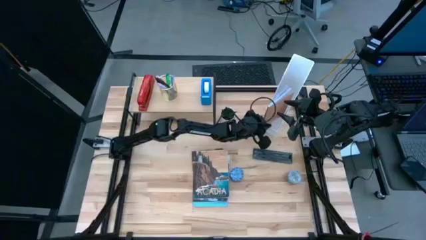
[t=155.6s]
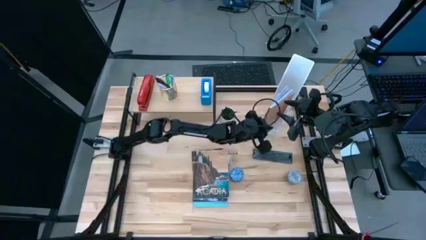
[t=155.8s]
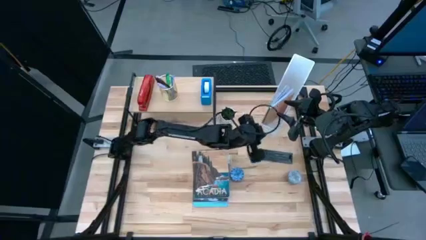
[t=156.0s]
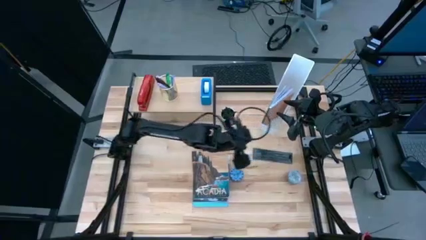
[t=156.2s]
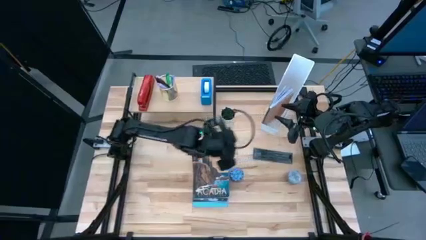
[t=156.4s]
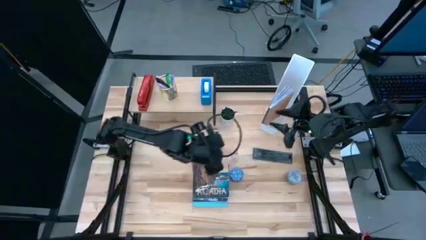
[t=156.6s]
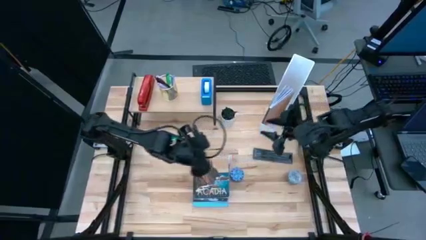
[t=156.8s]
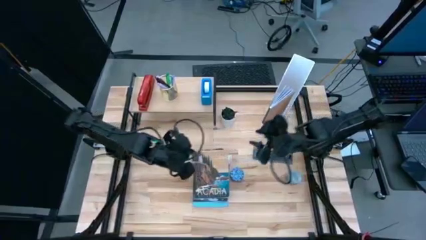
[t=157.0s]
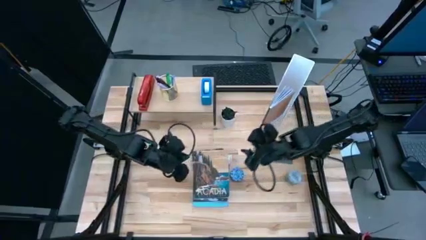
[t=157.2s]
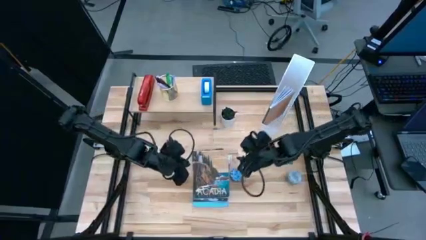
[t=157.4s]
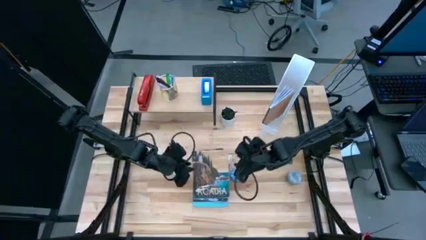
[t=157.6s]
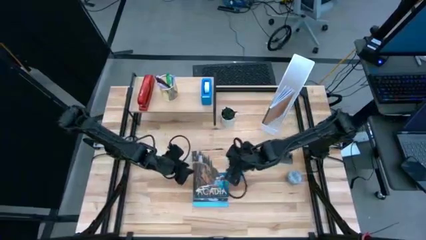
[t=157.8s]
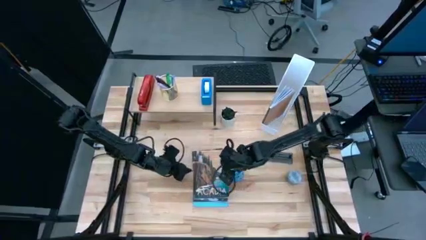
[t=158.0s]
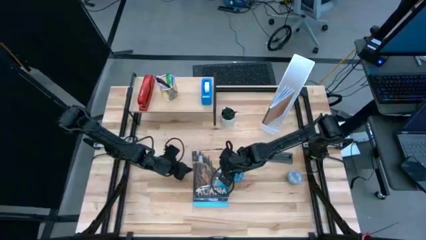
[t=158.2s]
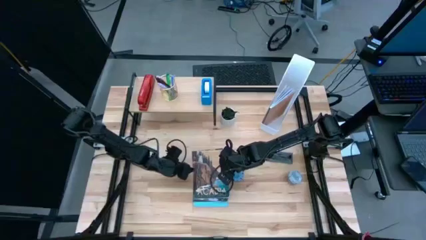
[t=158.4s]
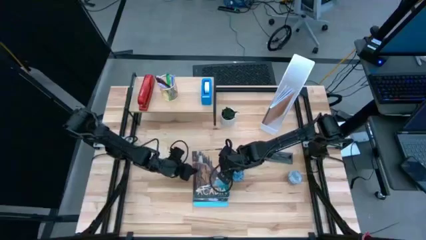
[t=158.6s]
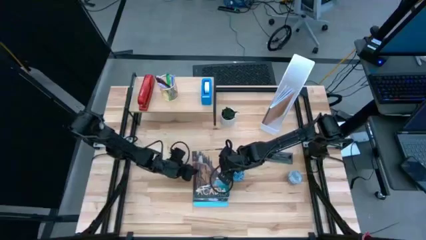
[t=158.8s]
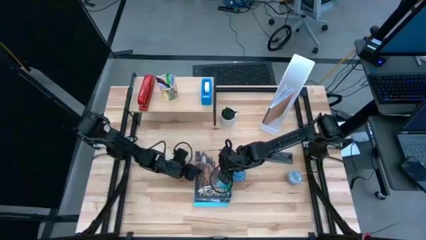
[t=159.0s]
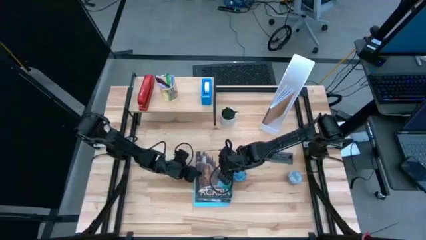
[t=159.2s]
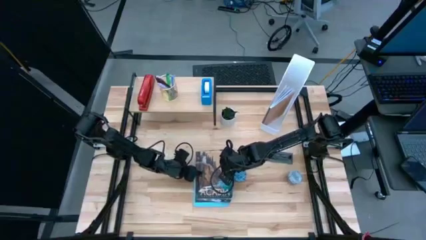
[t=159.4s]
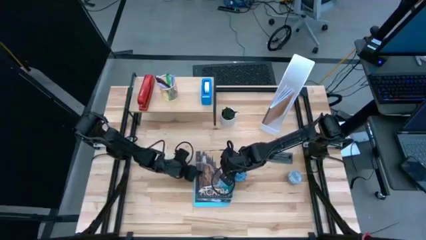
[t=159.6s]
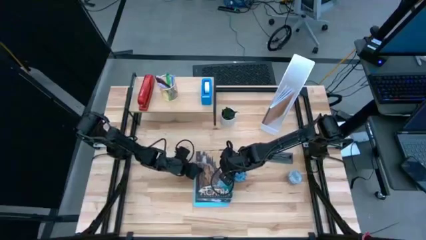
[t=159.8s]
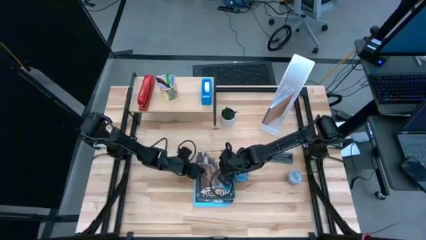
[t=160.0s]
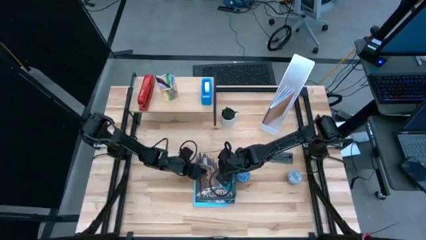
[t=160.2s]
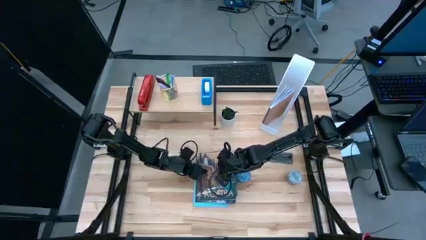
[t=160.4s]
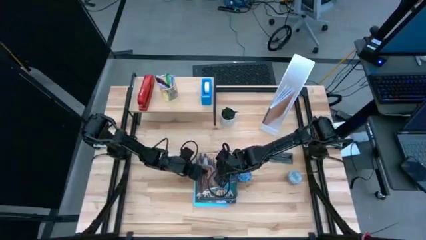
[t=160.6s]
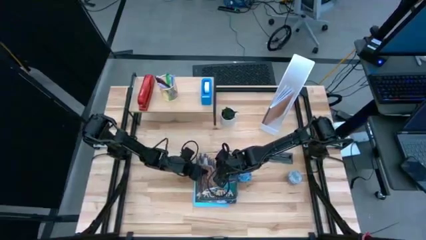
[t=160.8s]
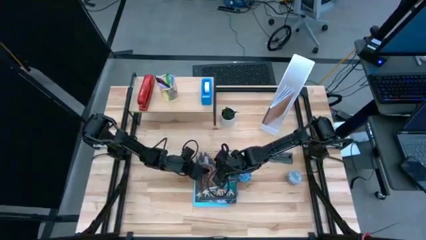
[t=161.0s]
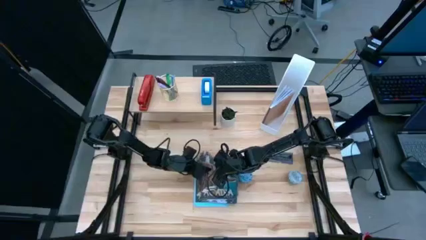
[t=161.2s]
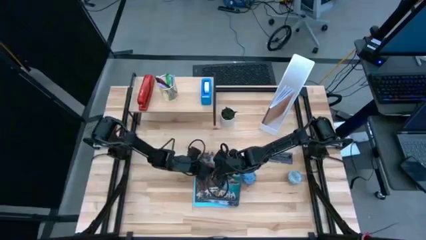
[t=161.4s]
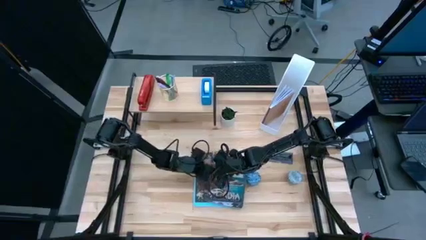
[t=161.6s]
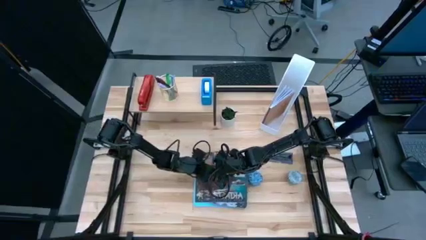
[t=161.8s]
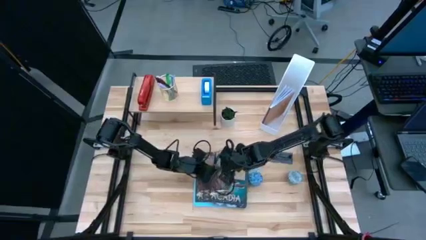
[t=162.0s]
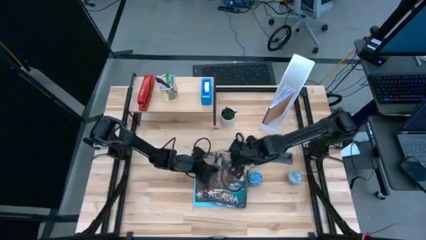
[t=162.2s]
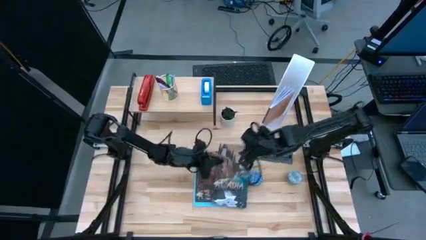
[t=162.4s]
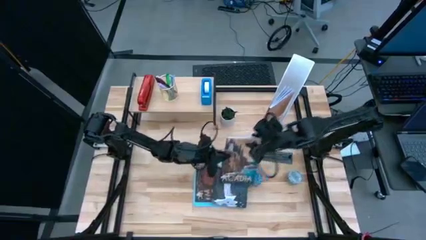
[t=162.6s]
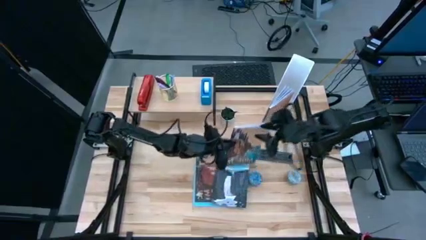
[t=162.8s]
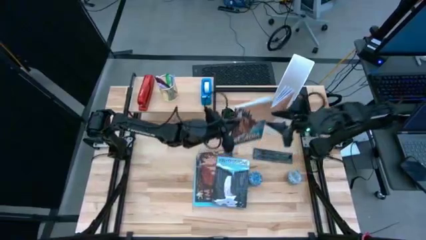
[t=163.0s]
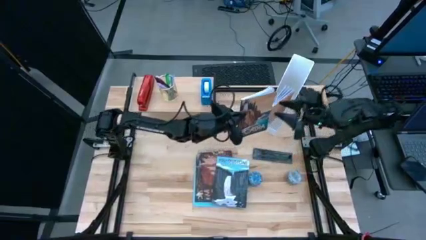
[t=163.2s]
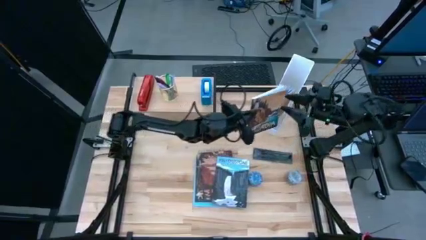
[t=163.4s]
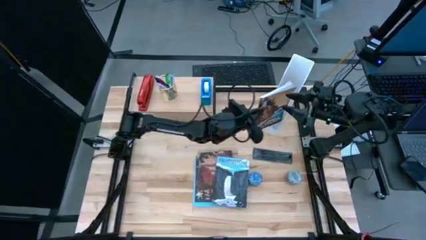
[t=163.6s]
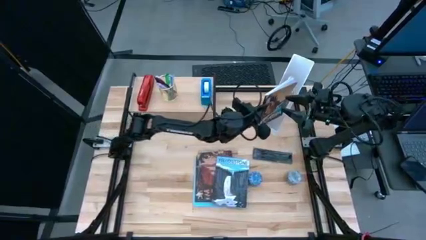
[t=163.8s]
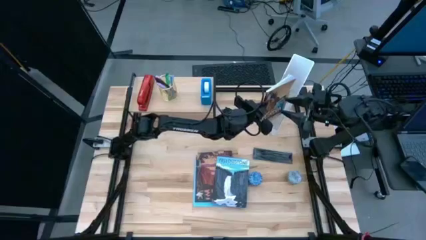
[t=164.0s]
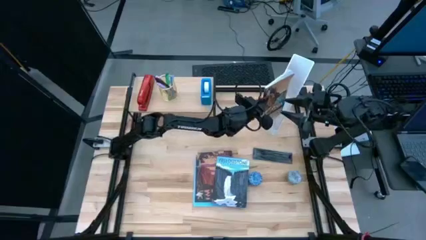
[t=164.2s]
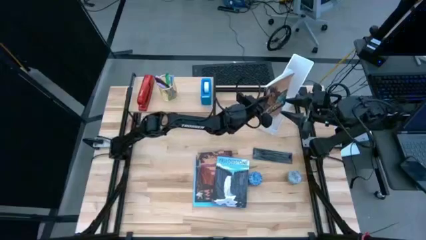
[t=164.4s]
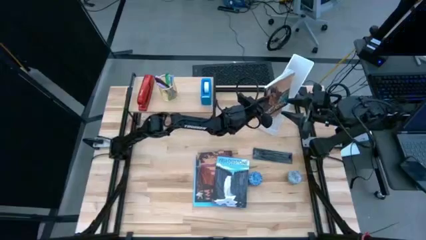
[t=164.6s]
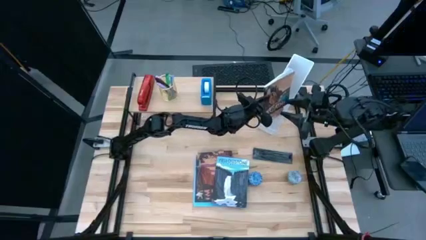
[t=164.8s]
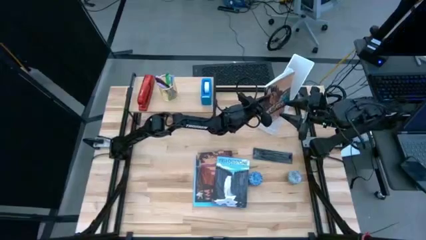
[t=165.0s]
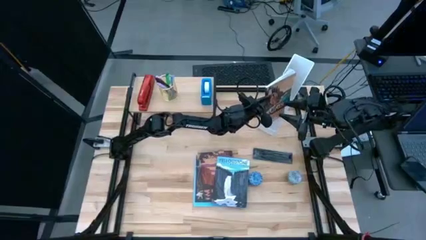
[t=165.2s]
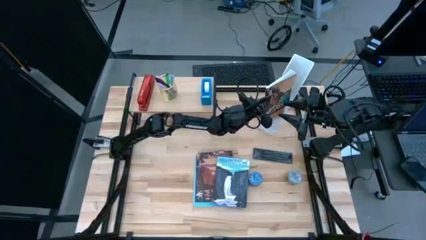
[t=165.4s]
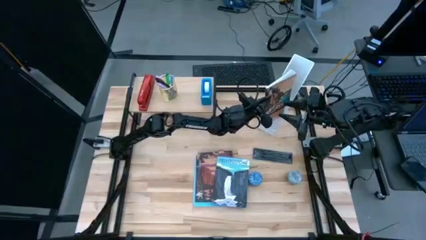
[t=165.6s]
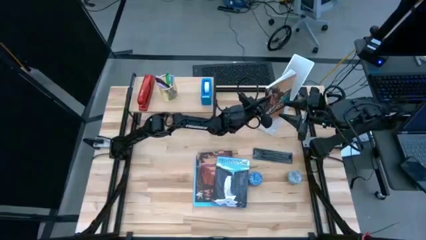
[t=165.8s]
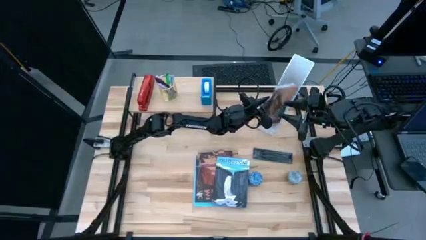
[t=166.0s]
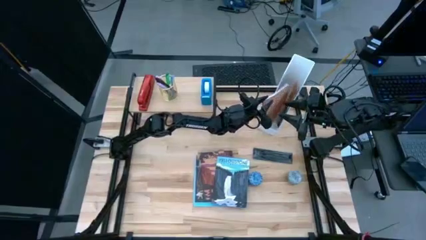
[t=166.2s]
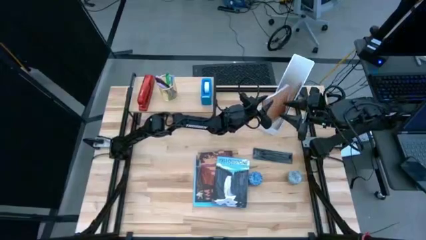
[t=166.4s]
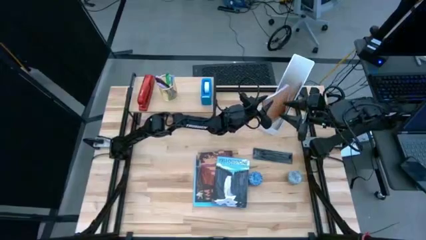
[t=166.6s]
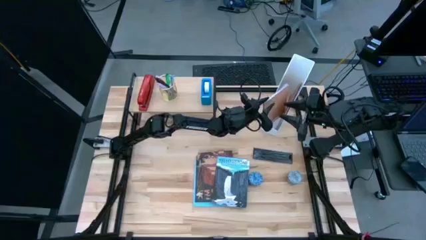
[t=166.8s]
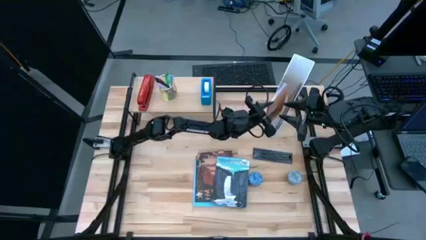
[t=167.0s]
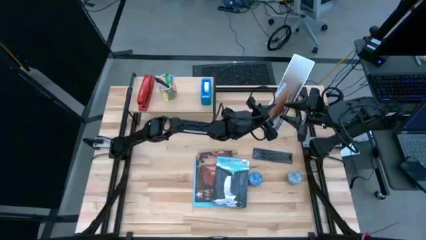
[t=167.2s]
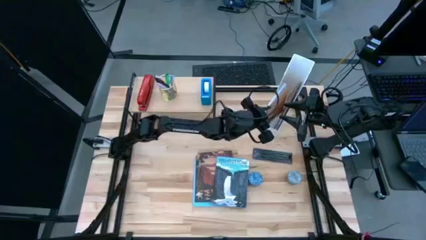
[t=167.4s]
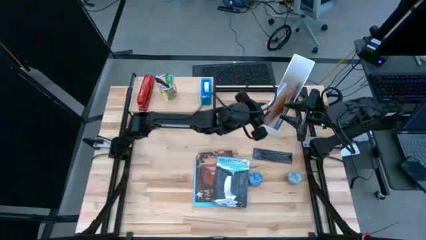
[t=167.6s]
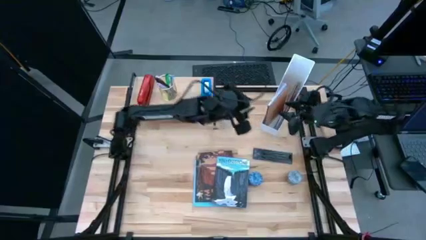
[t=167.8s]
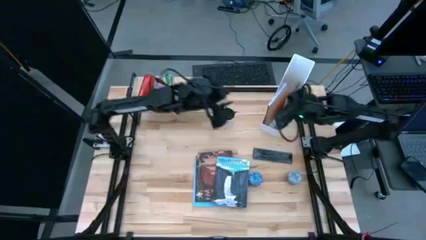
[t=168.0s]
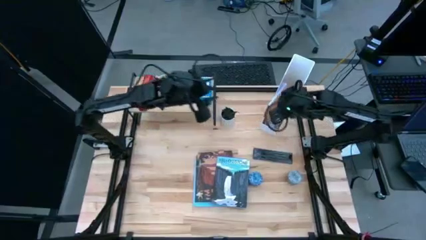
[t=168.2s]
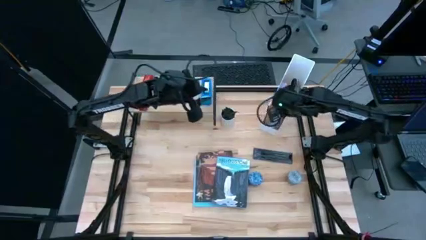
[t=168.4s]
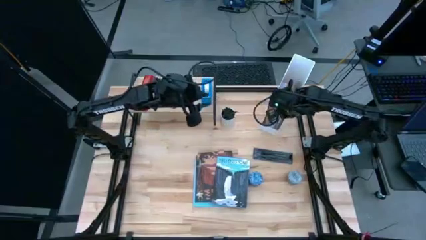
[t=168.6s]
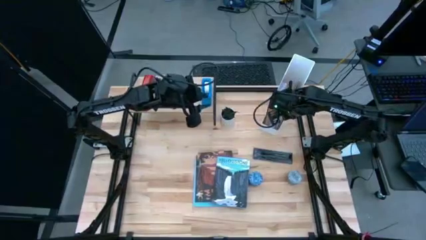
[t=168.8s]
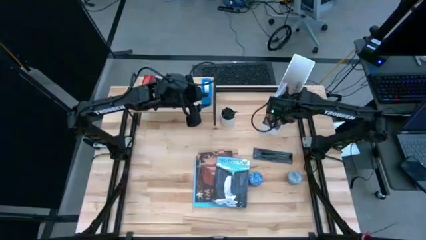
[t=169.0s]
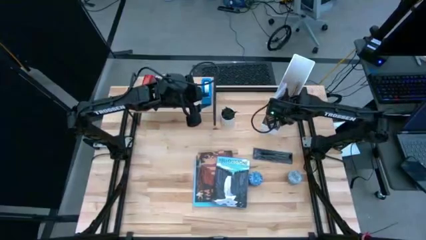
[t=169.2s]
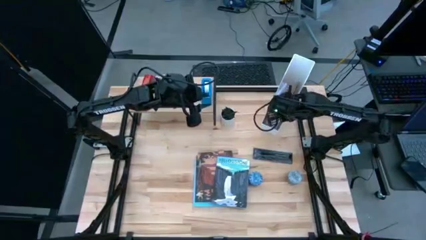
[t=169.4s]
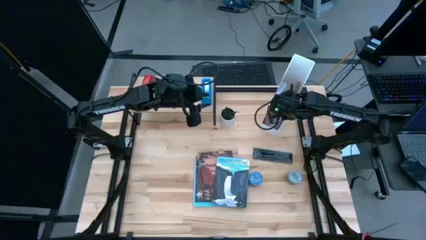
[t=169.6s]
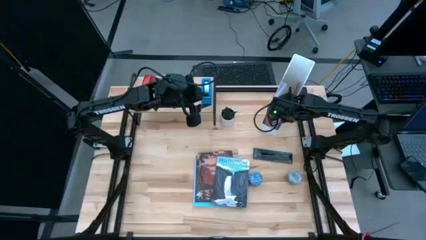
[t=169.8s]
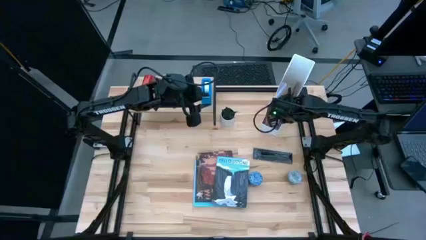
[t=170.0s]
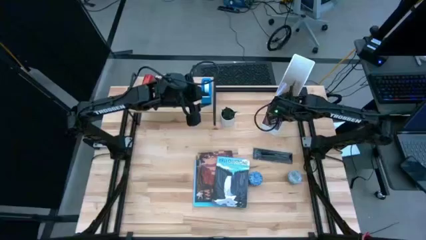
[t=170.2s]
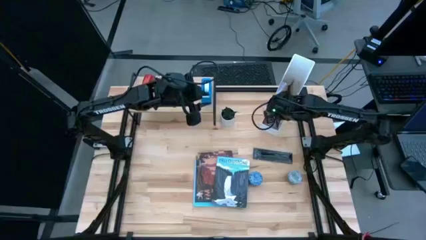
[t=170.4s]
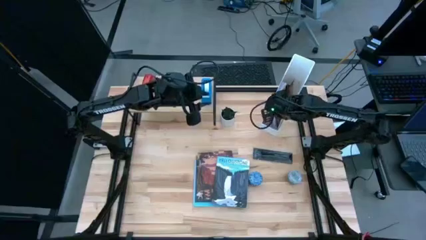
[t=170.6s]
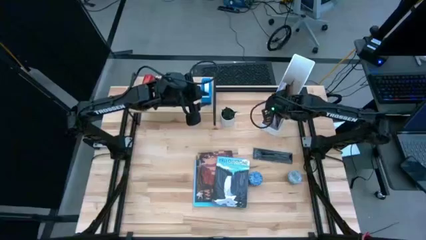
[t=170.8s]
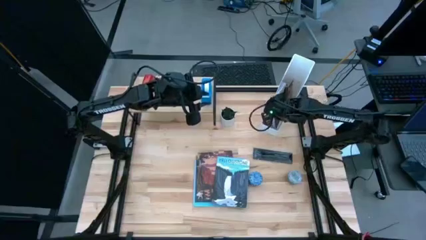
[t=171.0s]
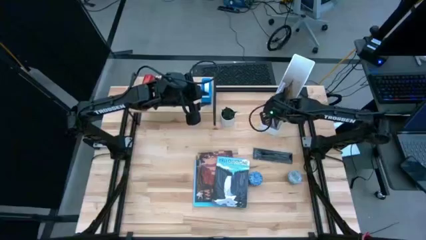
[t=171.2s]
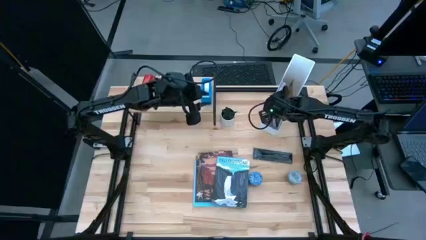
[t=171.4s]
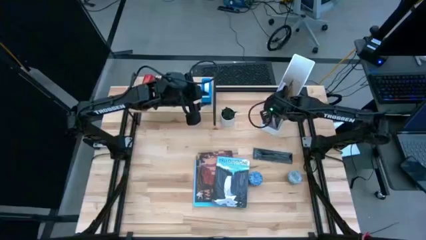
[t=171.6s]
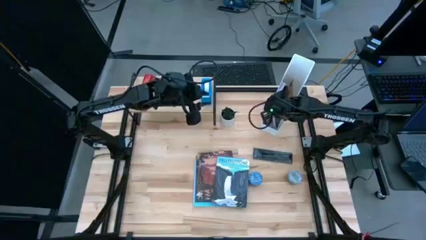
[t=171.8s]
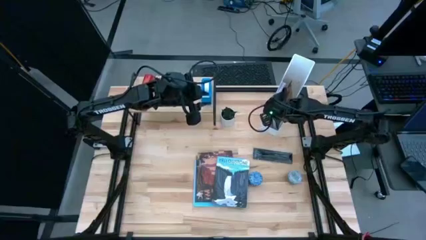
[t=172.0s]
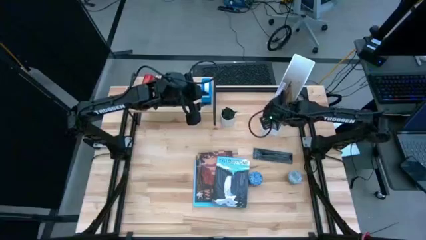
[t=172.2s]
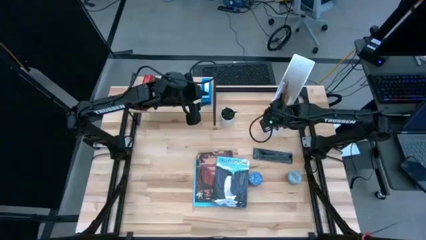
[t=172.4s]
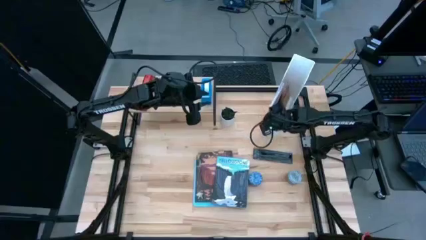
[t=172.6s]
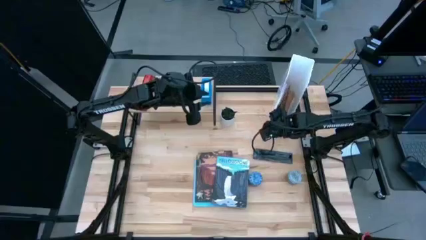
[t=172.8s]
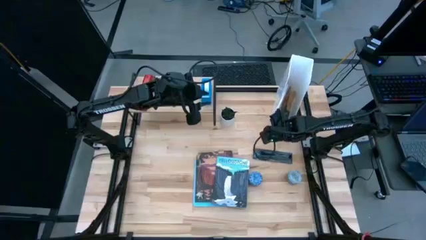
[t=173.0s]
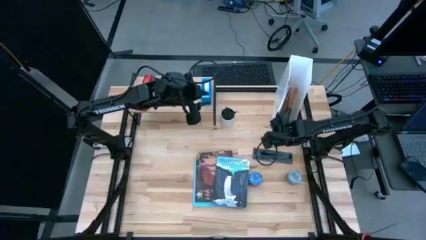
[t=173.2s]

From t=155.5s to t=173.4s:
Task: Stock shelves
Put the blue/brown book into the white book shelf
